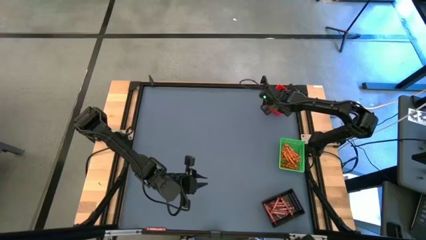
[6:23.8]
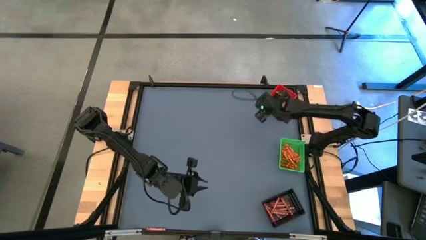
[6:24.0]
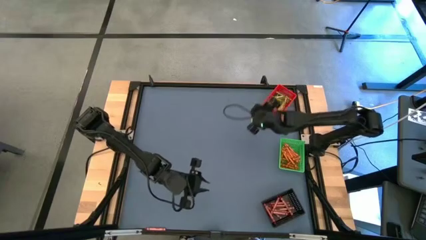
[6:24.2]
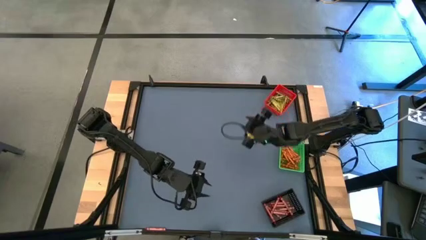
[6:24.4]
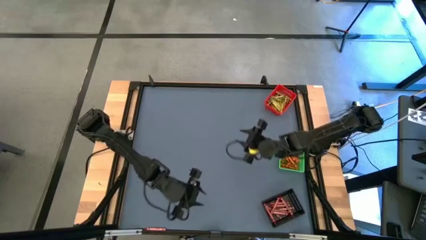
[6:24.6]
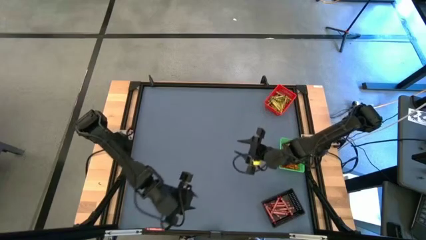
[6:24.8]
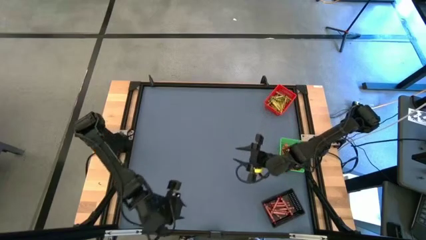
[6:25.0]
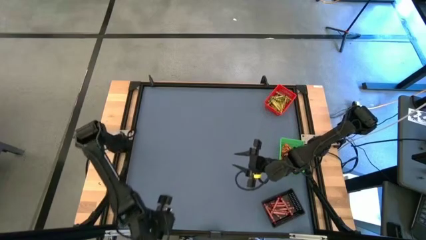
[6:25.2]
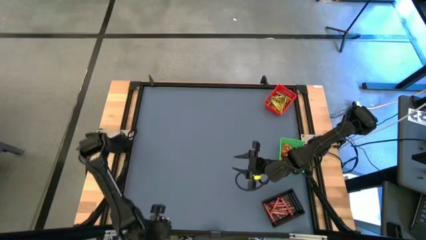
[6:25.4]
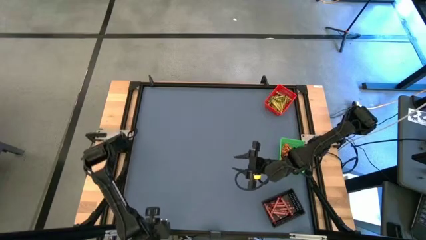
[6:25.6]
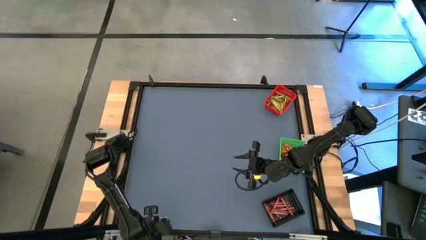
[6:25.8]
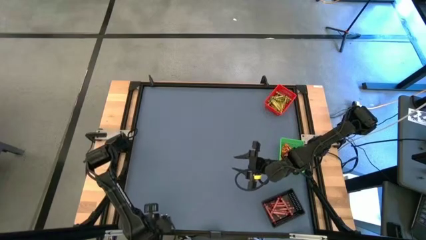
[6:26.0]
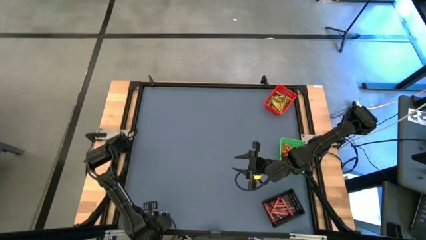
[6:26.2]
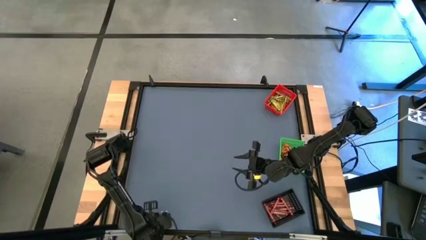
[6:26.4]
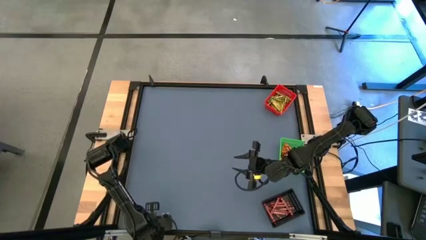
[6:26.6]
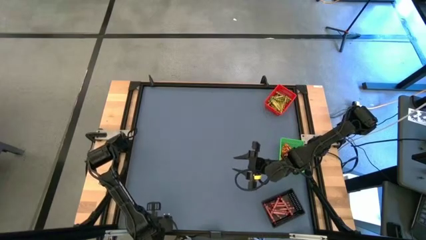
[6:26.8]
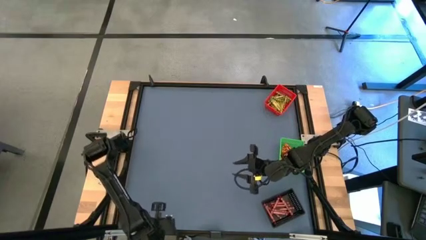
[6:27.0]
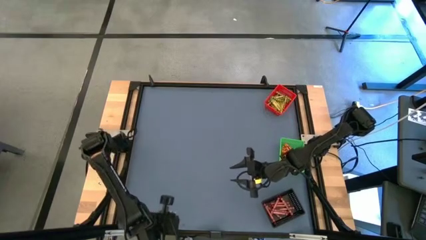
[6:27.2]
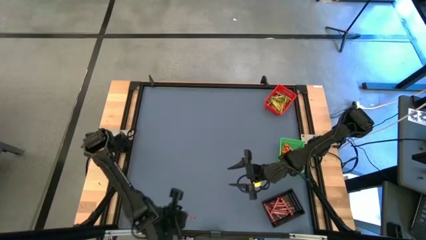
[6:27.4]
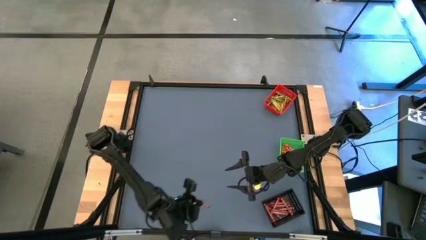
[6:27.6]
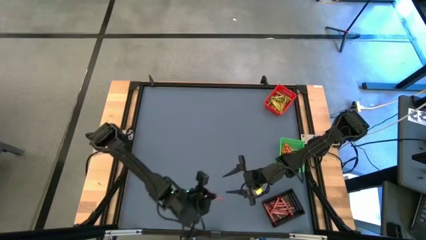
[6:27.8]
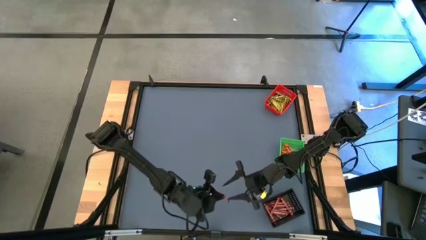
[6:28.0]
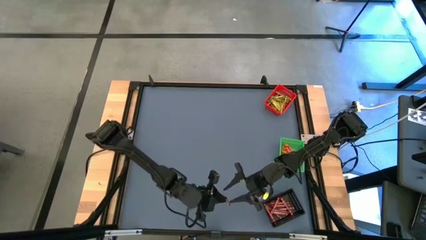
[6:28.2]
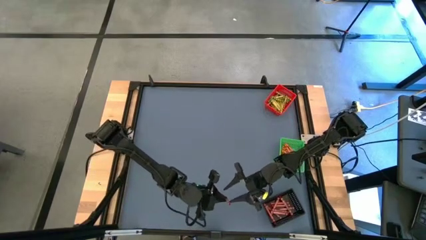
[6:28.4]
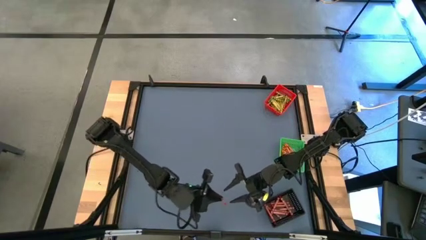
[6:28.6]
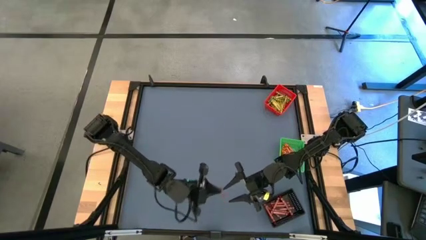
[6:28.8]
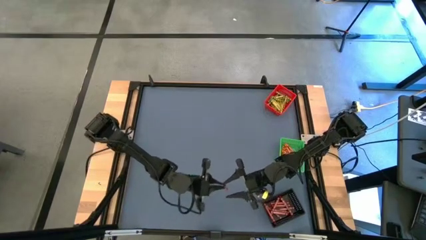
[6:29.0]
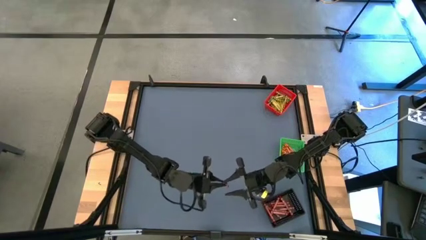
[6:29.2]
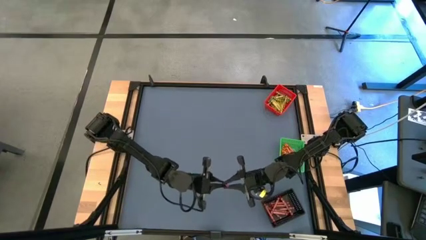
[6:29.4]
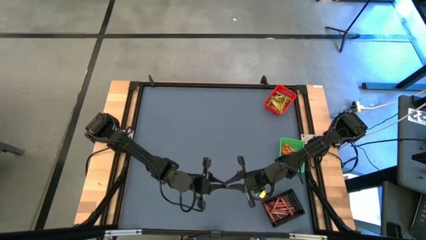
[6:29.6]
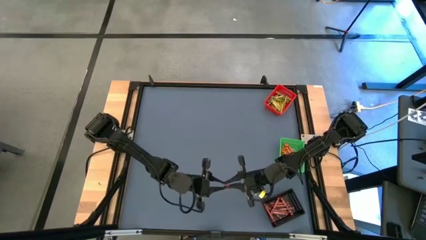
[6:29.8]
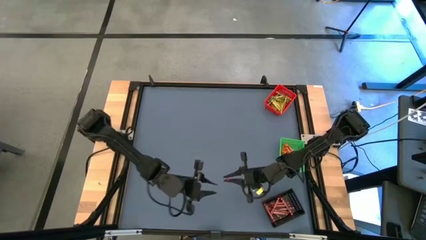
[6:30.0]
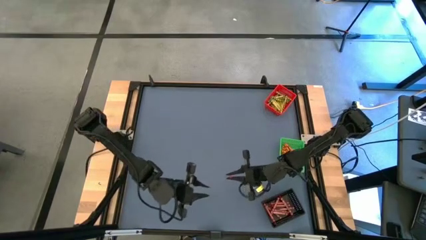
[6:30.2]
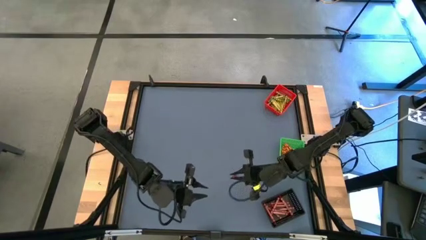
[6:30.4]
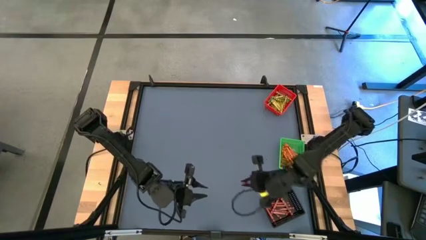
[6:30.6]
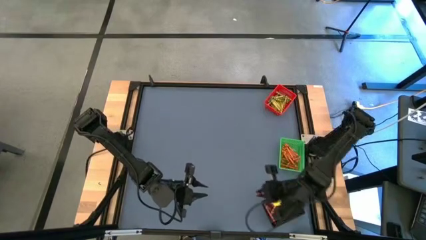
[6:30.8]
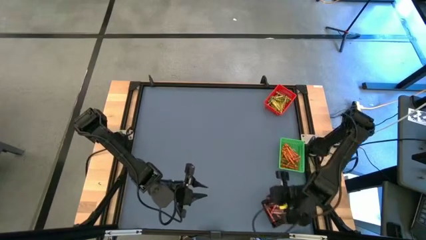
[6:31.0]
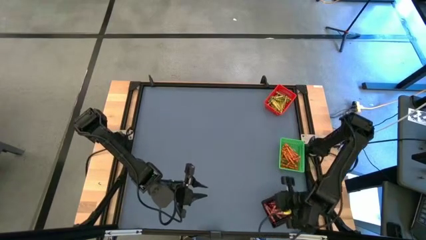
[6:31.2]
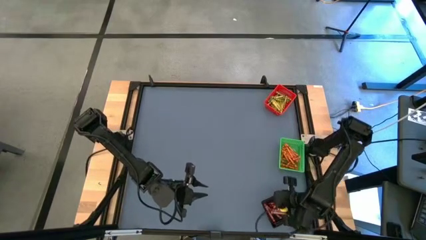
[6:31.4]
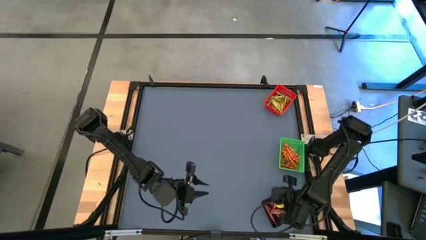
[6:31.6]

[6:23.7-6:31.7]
Task: Sort crayons
Put the red crayon into the black bin

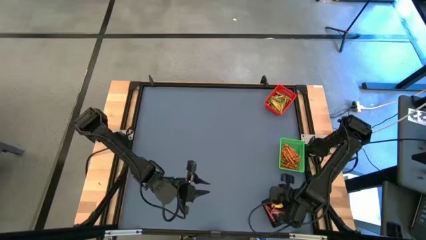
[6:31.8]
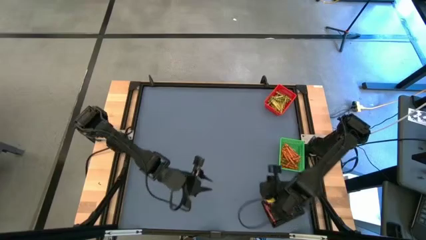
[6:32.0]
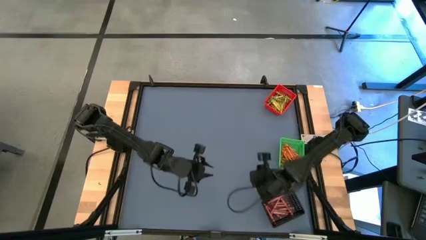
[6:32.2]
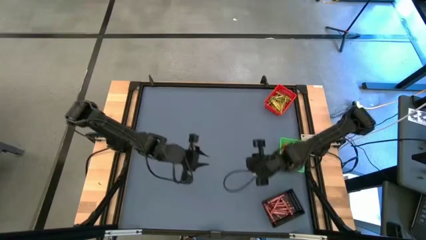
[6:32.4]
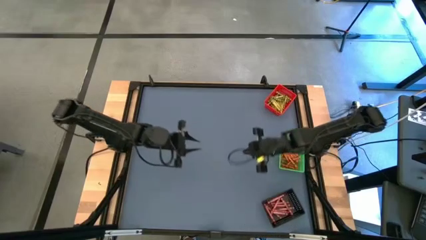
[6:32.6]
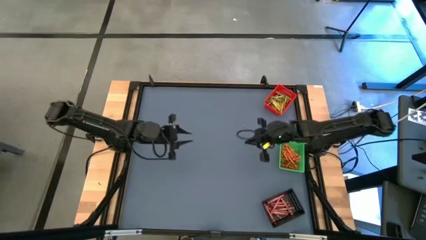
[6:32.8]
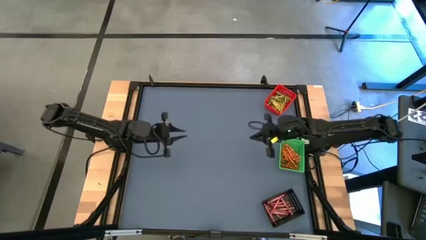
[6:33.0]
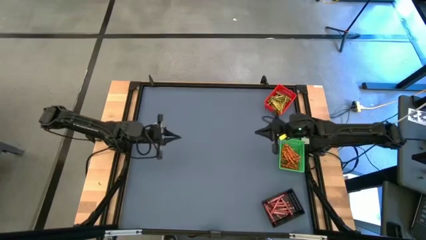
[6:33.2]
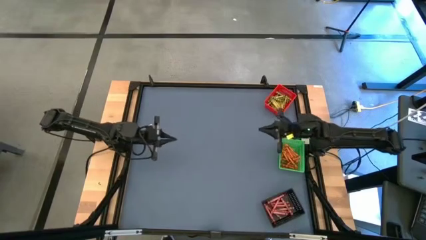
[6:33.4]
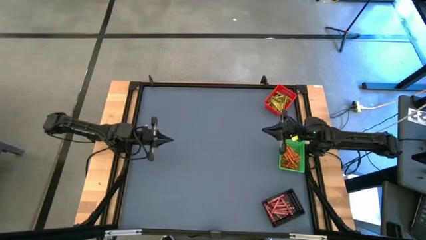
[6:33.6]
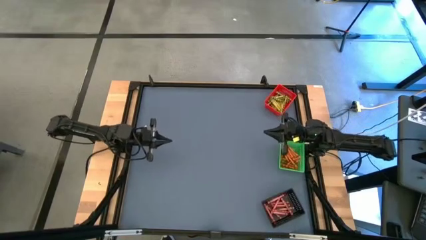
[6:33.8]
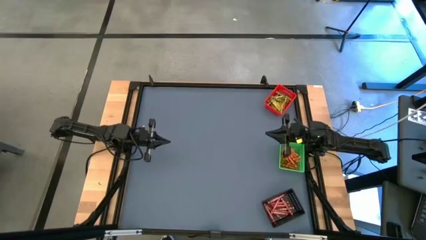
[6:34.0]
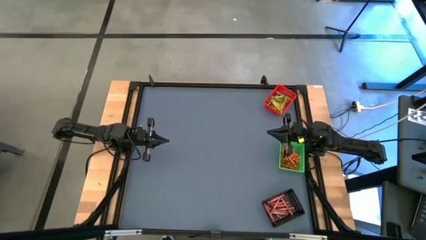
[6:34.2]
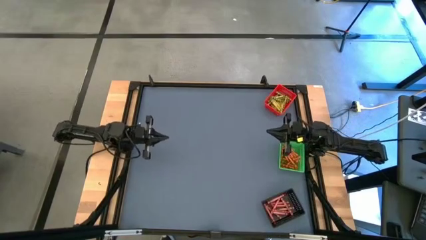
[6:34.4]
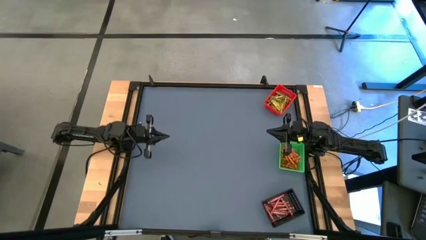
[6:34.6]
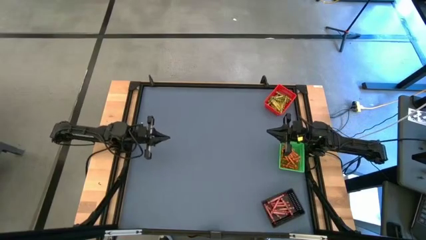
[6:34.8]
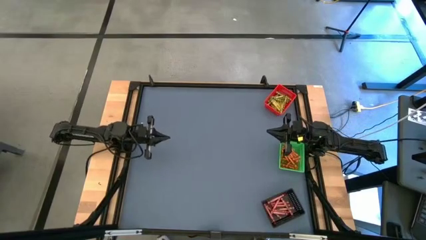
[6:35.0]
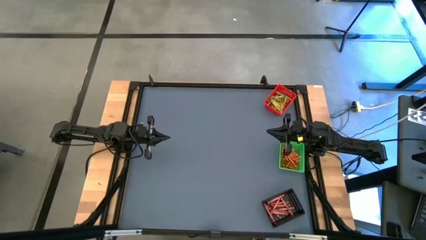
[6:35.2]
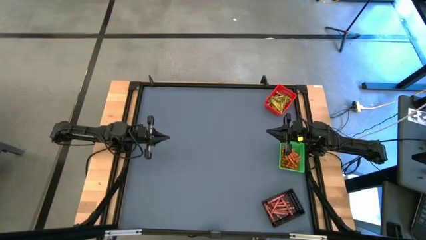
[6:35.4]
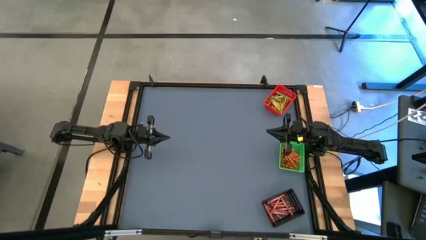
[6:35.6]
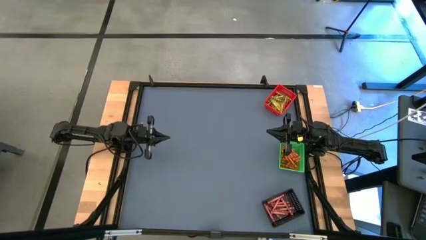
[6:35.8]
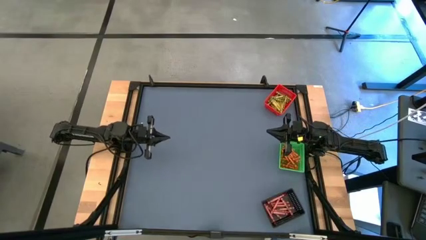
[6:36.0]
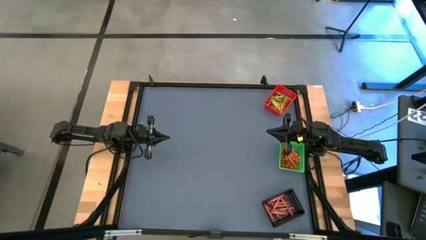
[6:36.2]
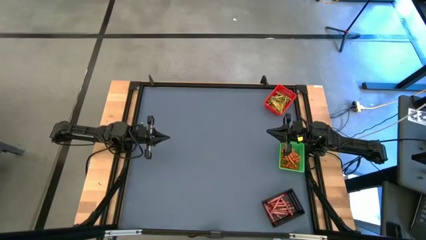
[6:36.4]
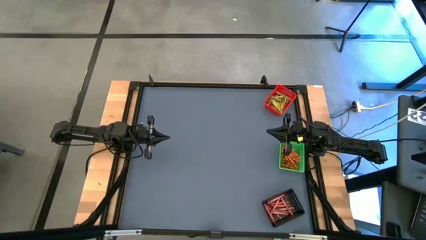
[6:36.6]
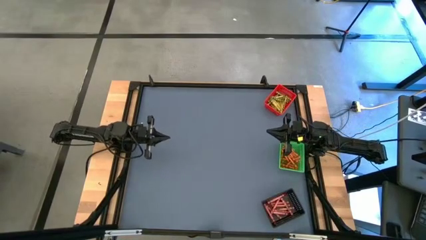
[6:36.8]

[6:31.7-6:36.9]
Return to Home Position
